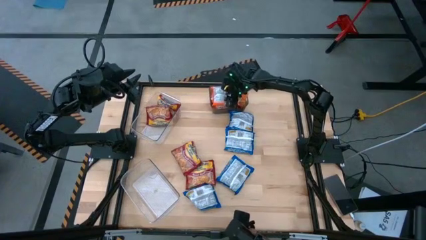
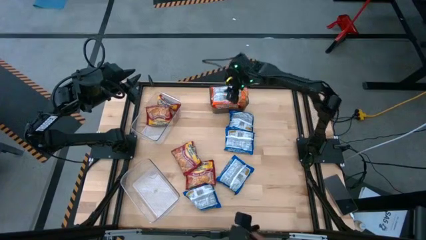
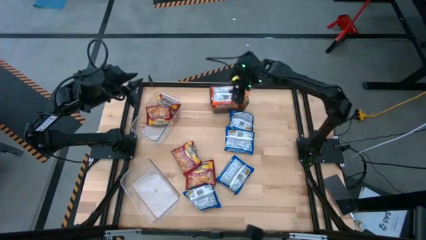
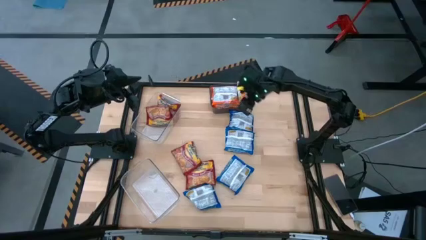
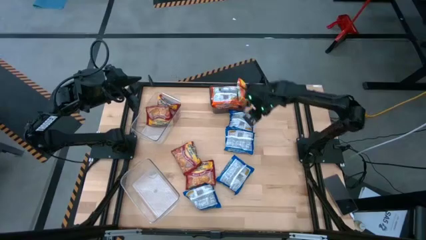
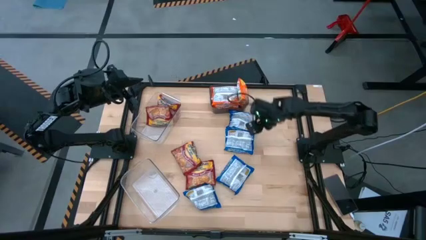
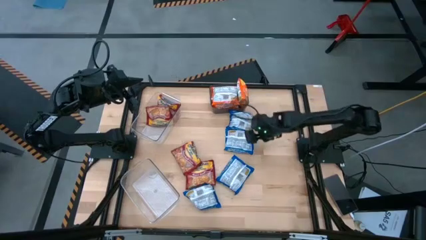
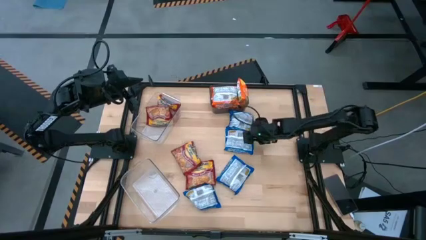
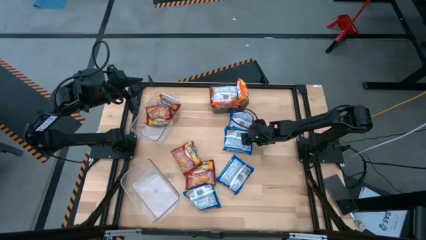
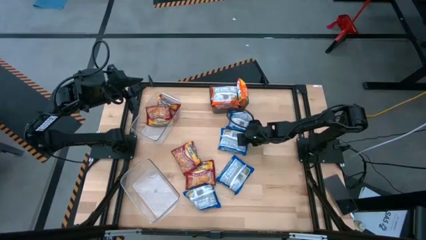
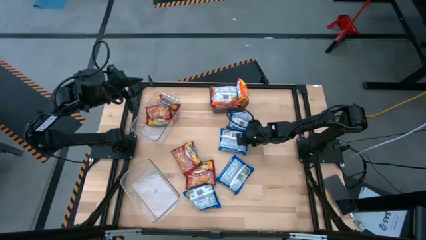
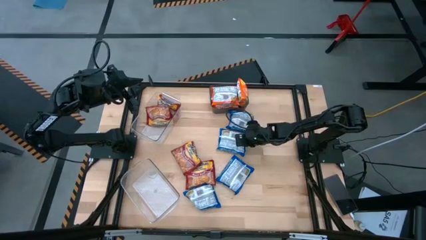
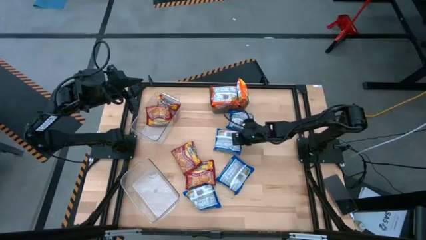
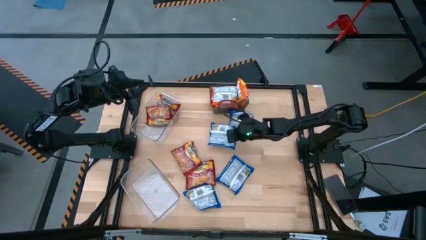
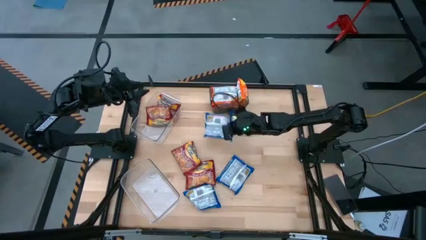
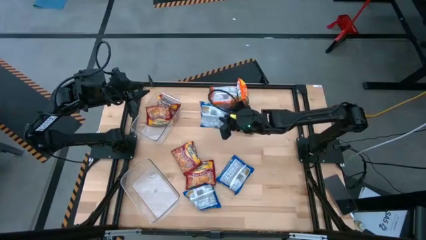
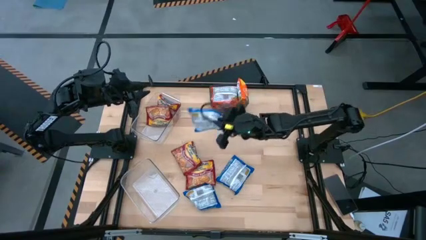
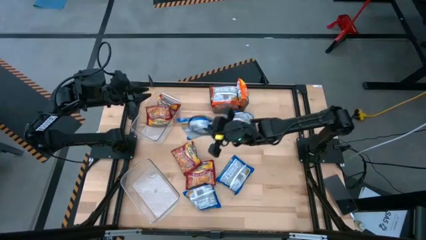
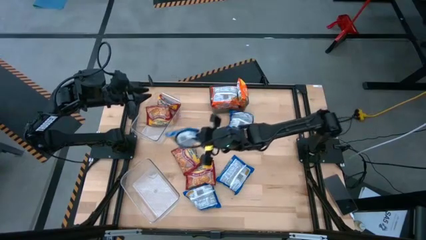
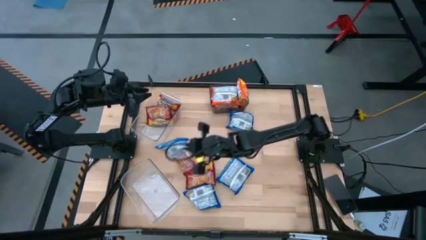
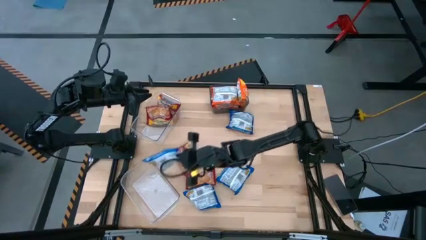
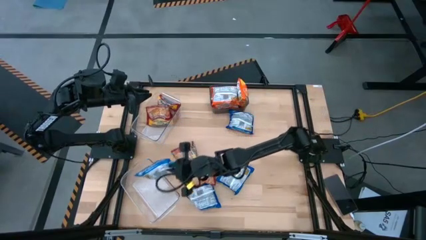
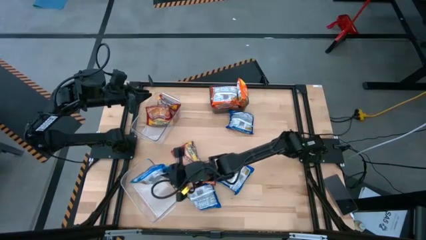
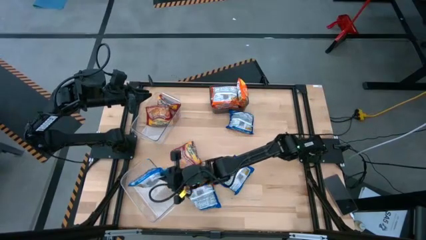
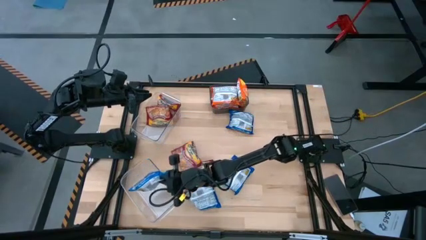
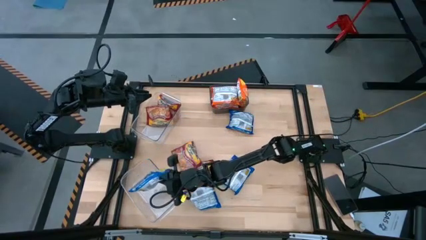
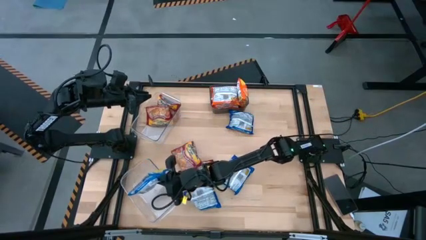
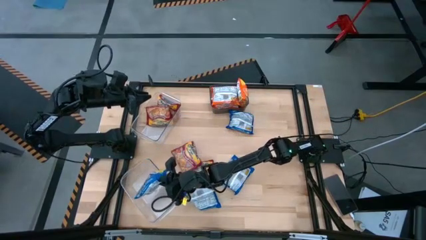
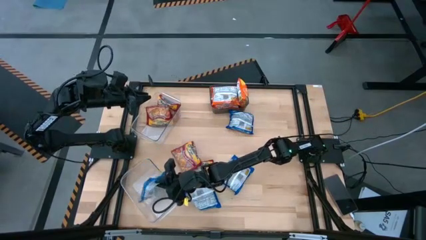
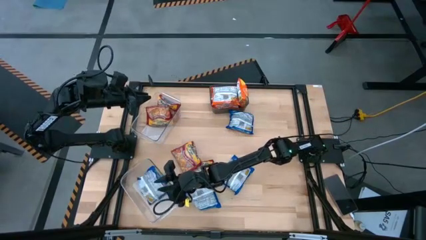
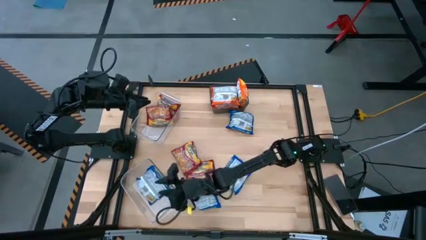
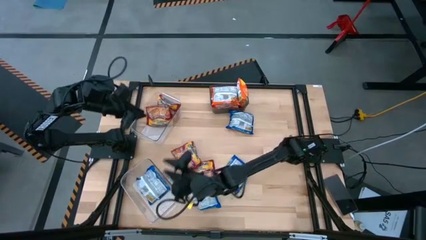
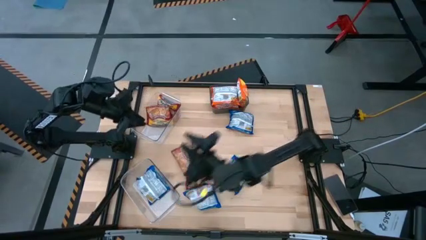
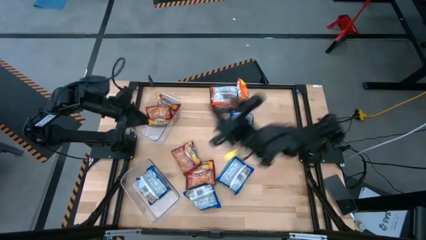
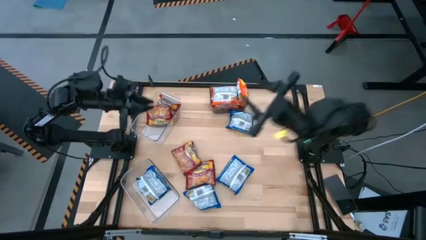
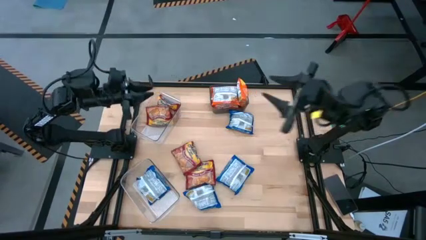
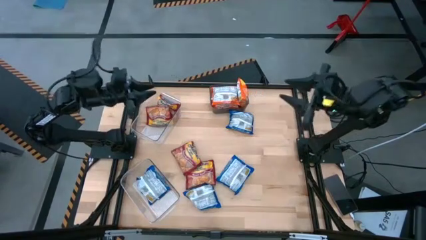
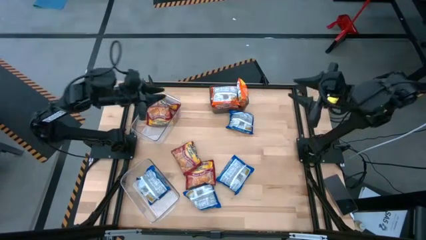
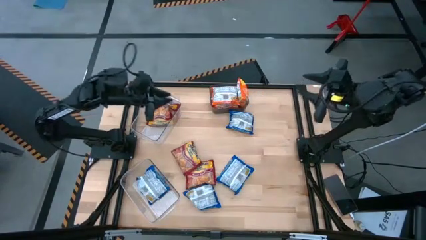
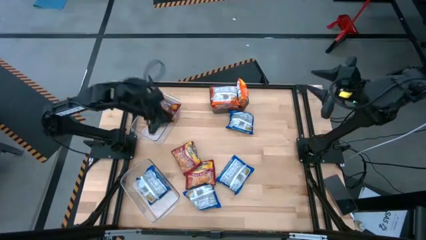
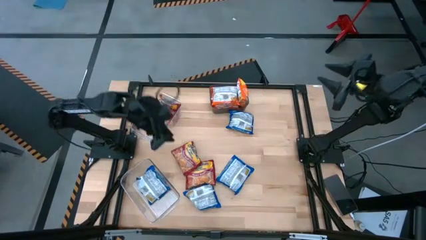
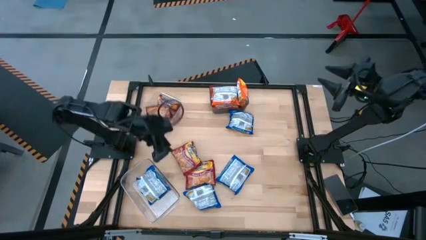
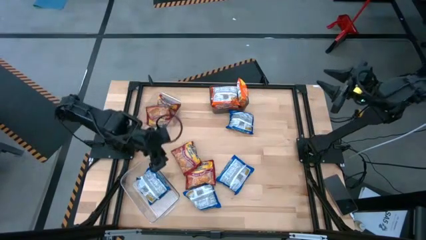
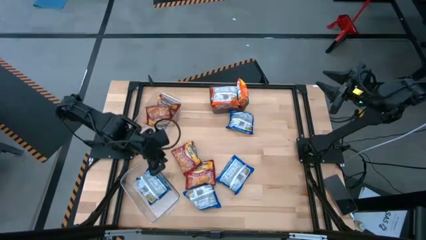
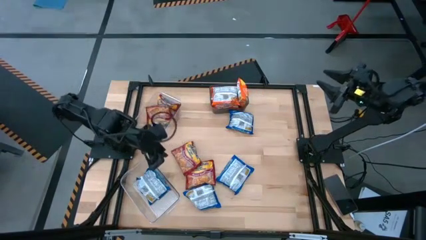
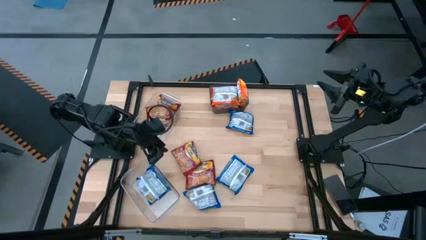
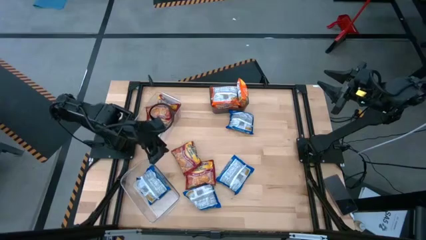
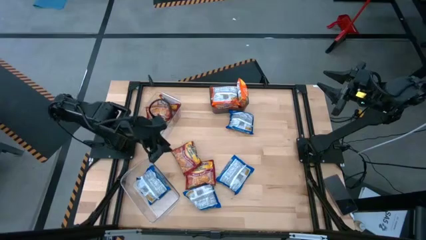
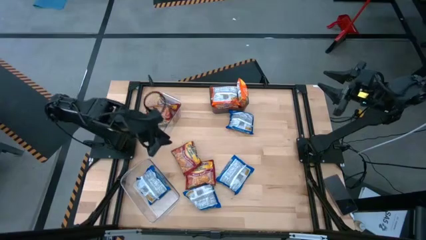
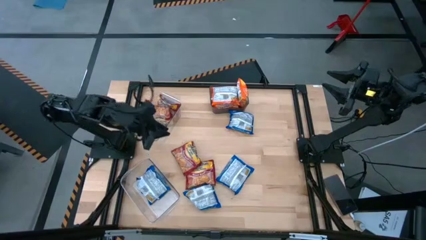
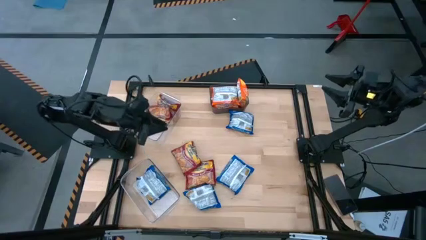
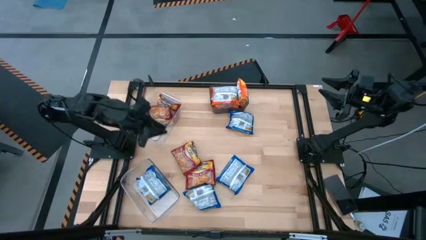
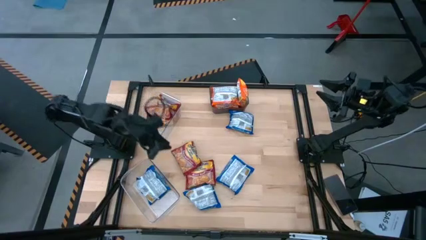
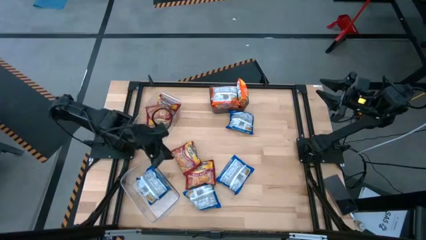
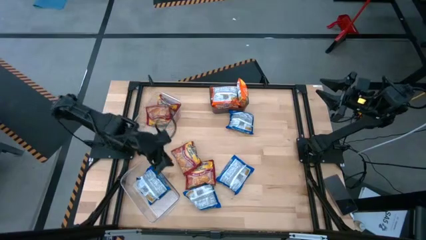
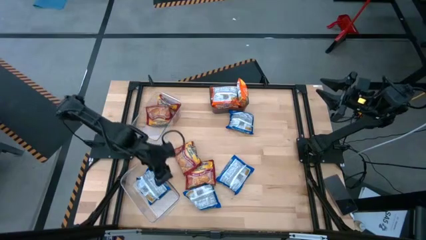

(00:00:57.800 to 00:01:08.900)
Task: Sort Maruchan noodles
Put the middle blue noodle pack into the bottom transparent bin
